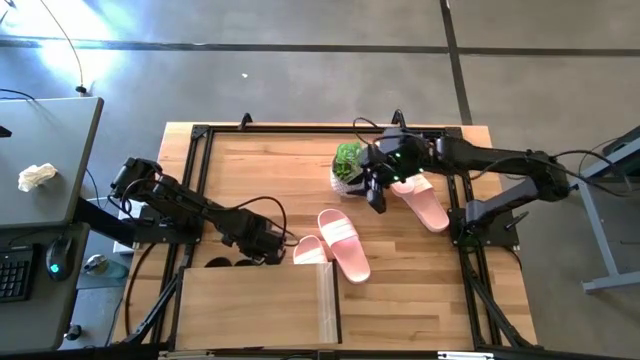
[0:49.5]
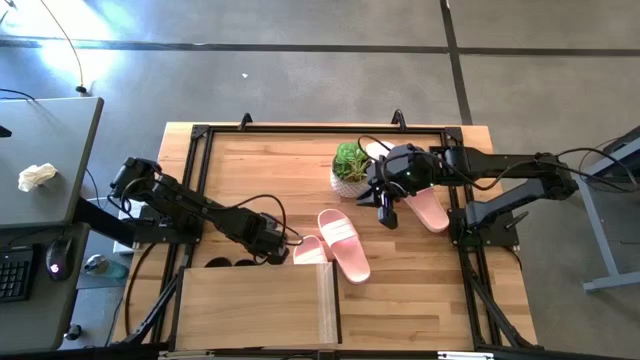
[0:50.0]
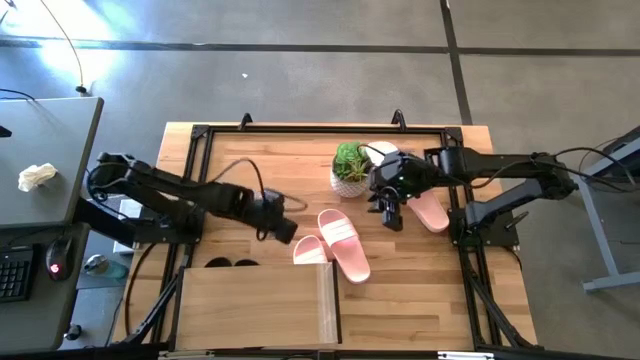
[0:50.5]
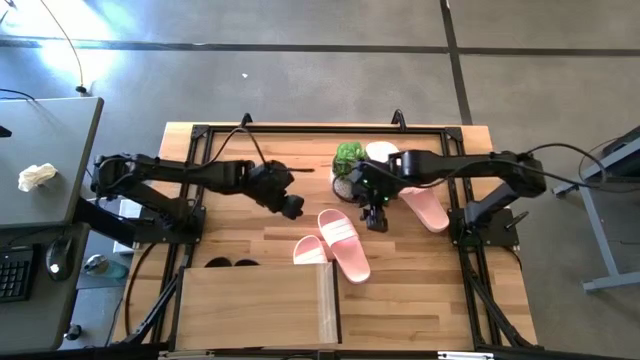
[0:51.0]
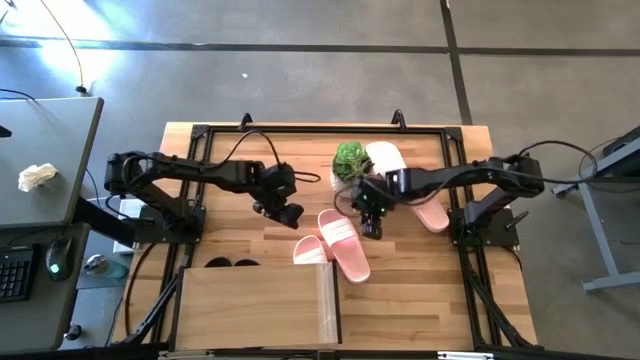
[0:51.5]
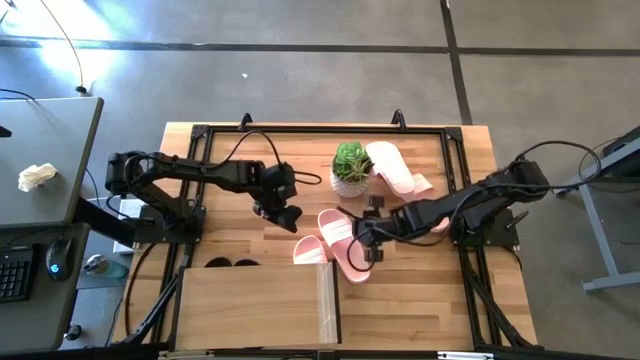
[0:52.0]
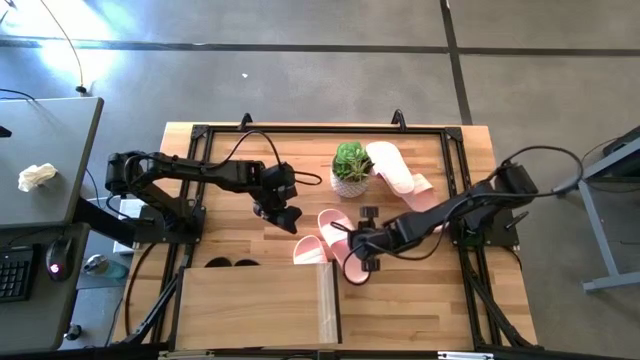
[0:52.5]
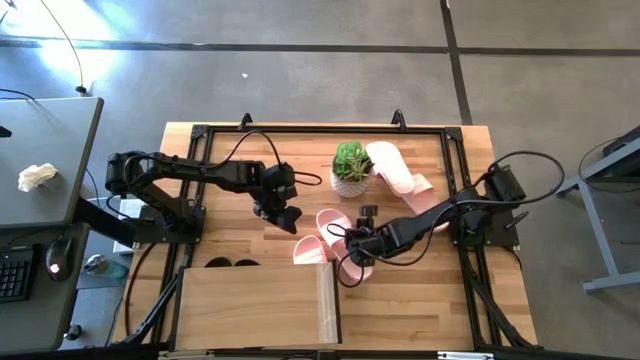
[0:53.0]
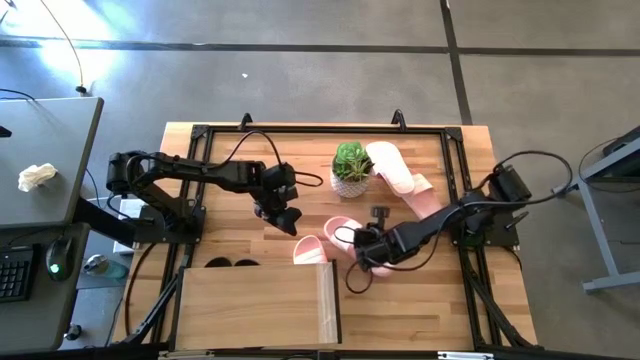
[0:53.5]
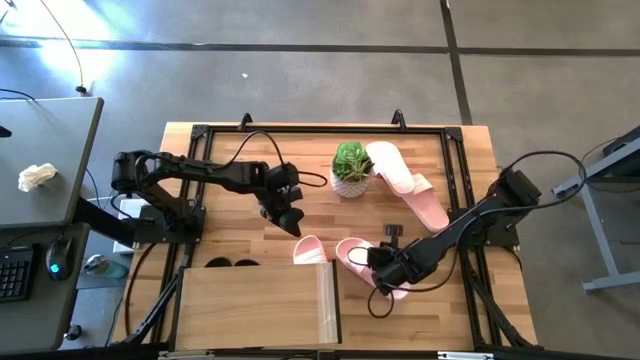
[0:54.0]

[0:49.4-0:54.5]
Task: Pick and place slides into the shelf
Adjust the pink slide on the table

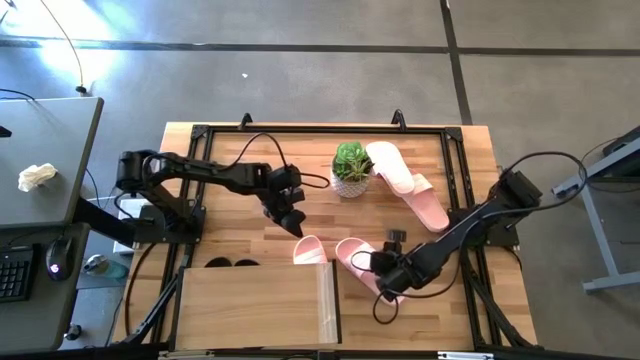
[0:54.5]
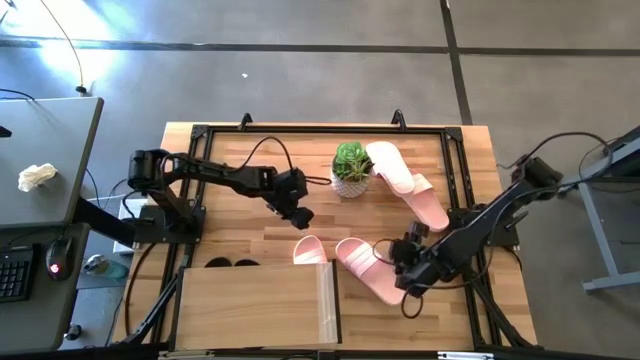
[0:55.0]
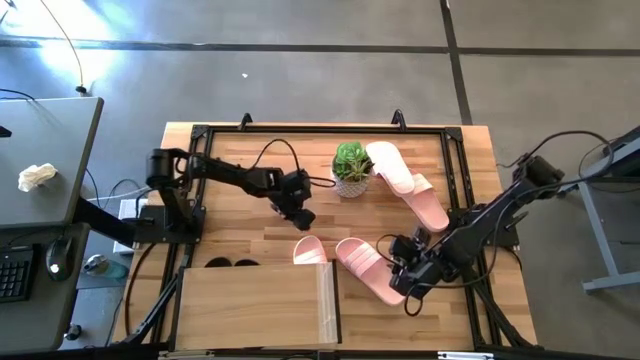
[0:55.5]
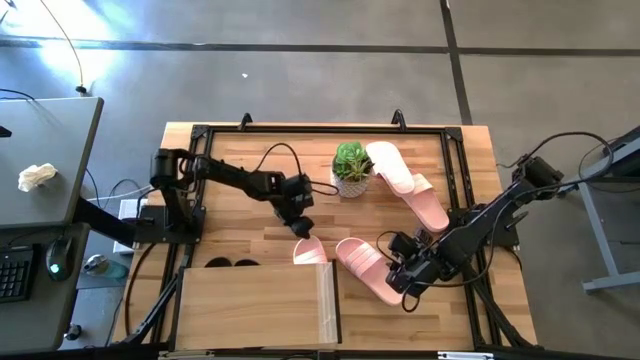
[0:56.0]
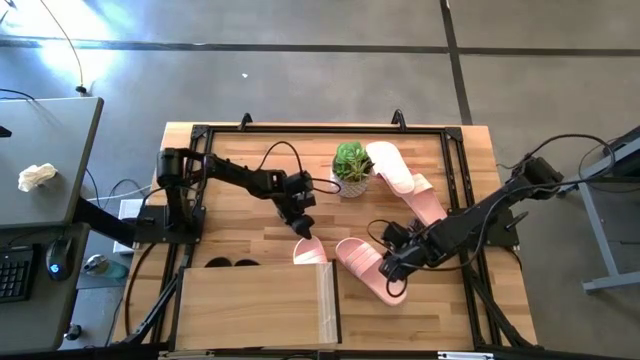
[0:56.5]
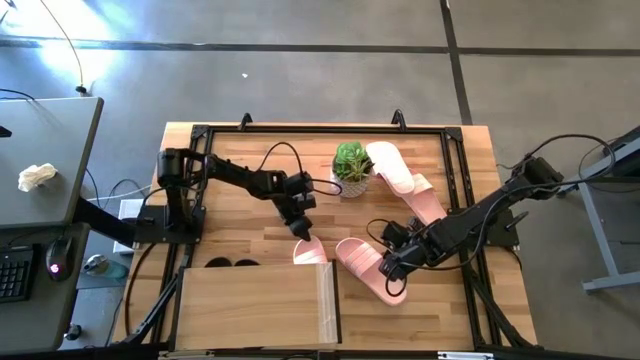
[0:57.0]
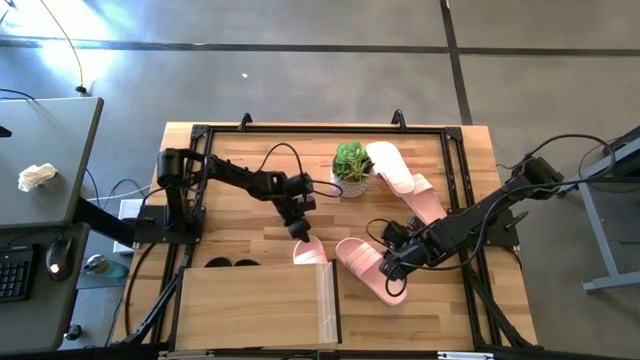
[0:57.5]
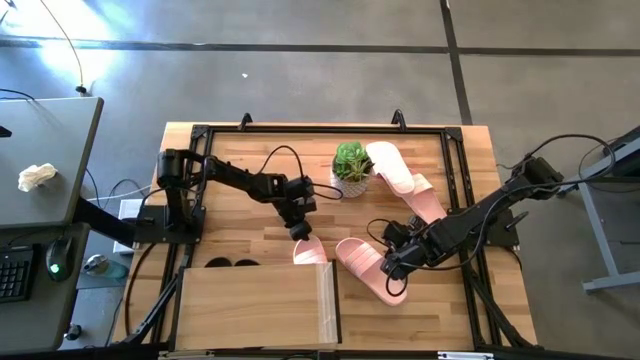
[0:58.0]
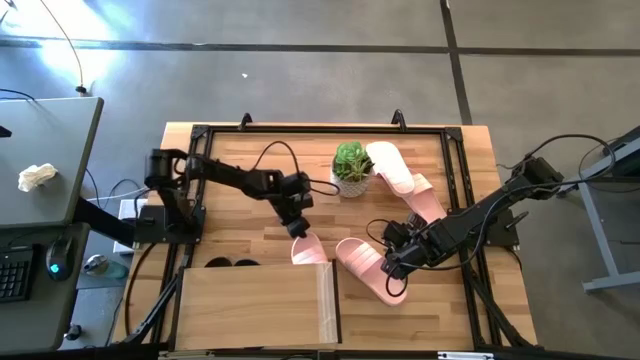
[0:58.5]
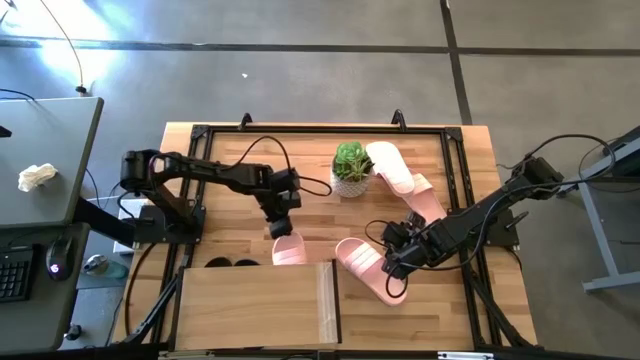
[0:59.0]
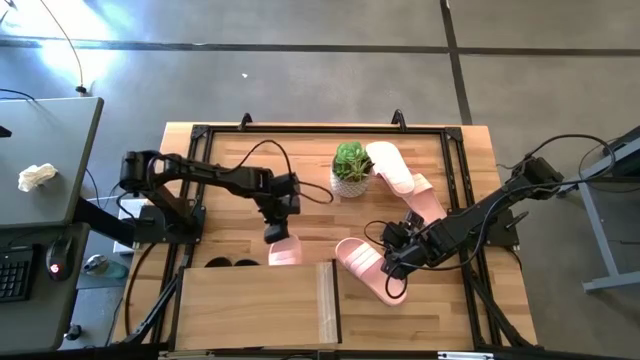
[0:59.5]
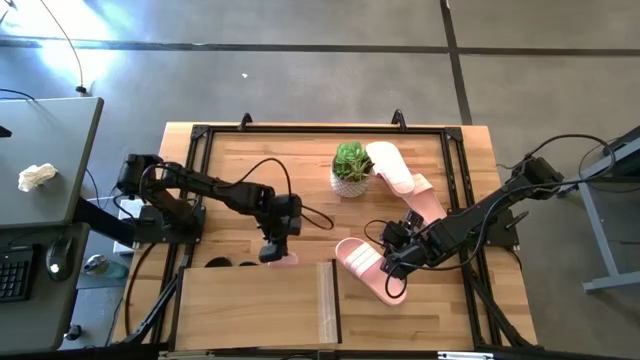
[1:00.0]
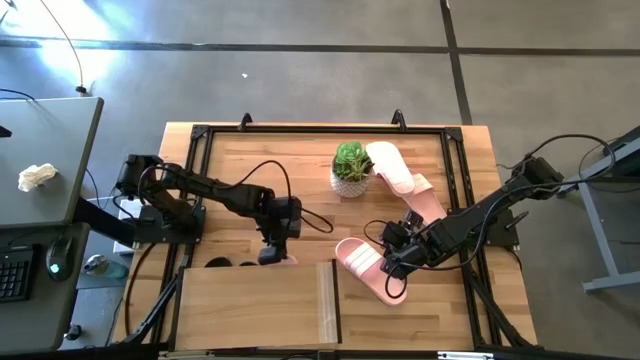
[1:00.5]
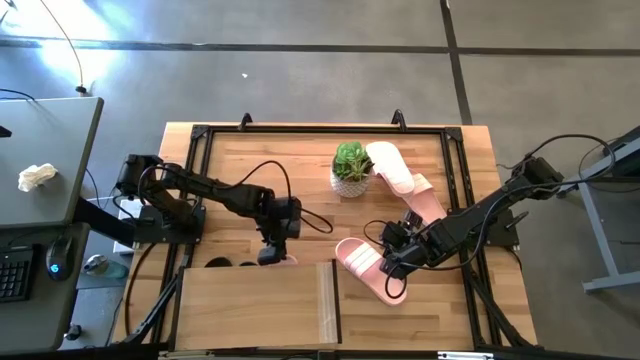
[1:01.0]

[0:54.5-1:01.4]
Put the pink slide under the shelf

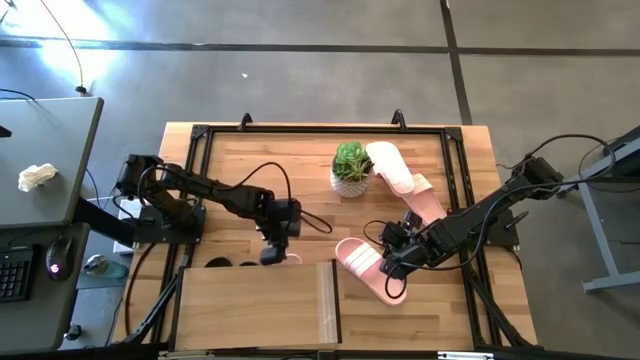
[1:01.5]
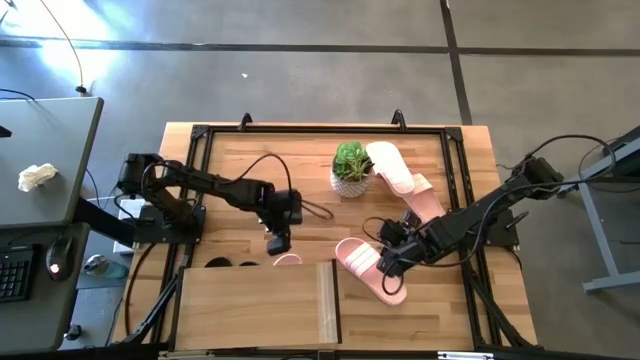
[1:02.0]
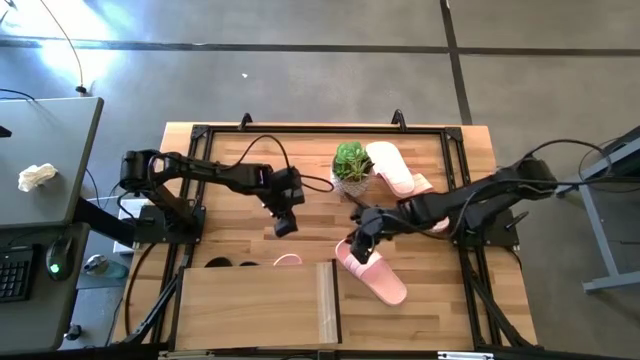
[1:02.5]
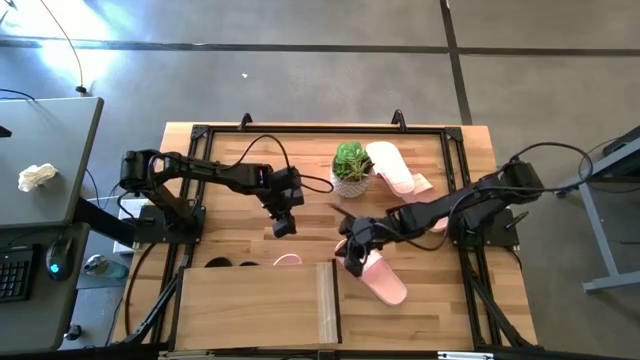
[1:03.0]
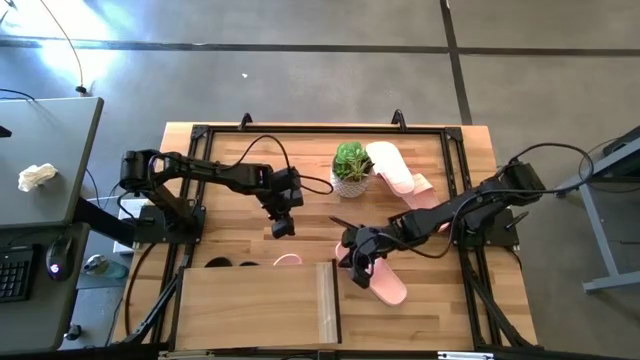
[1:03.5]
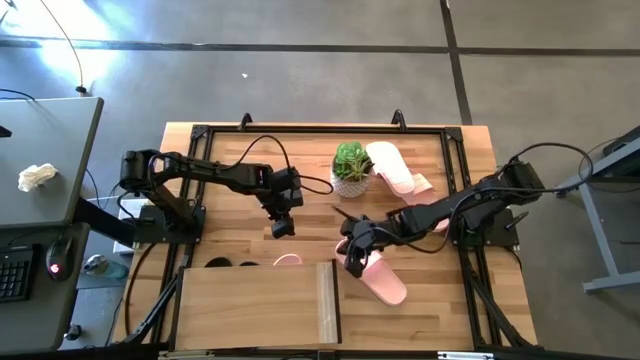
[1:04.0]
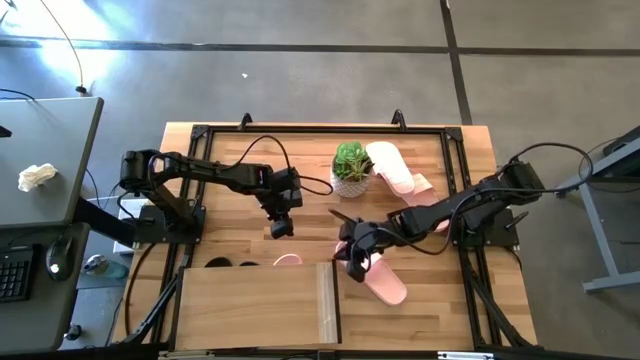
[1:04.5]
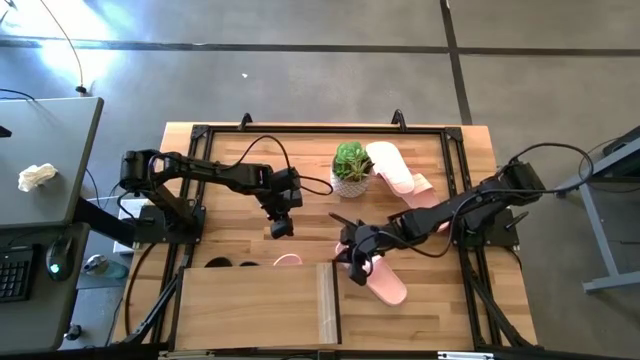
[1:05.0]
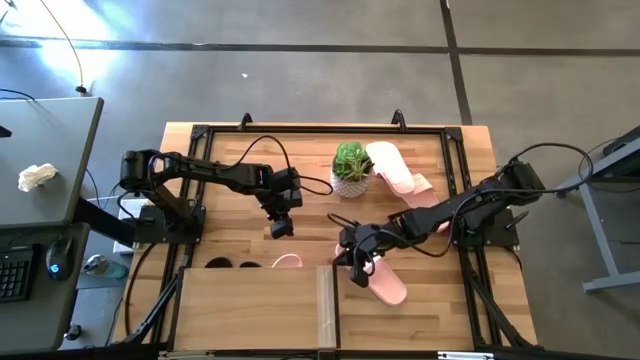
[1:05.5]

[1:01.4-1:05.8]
Adjust the shelf on the table

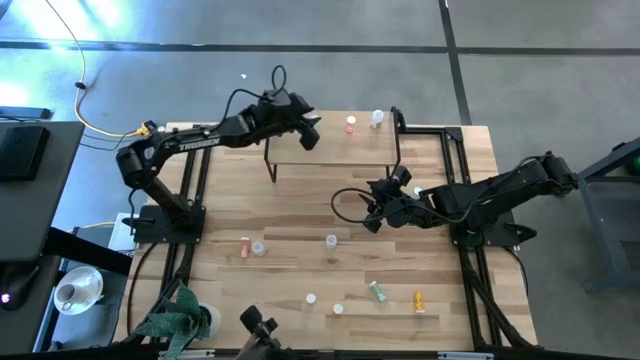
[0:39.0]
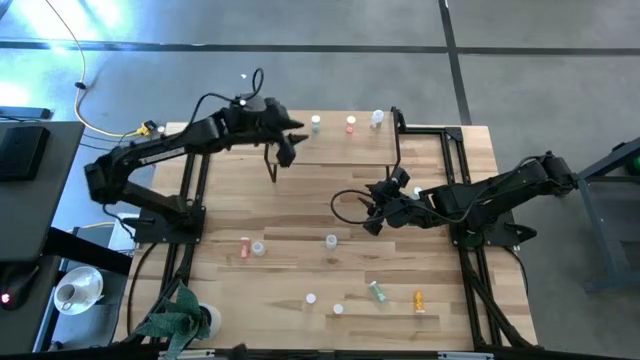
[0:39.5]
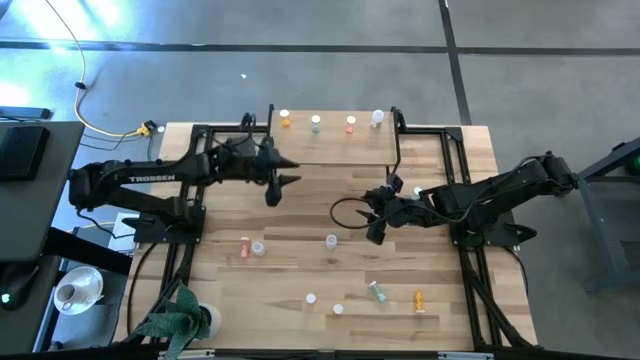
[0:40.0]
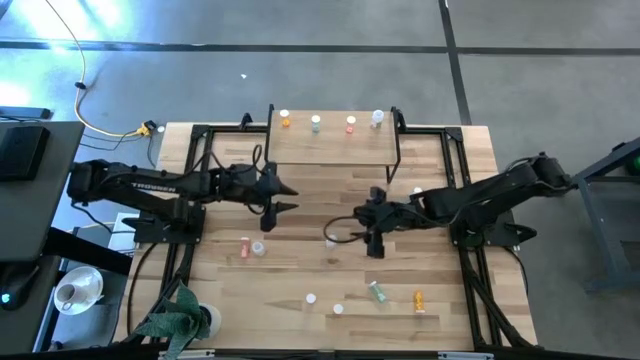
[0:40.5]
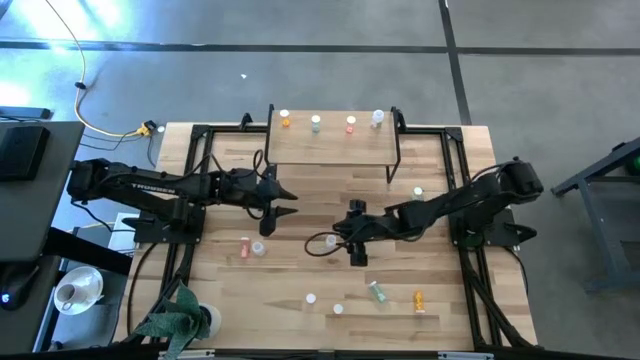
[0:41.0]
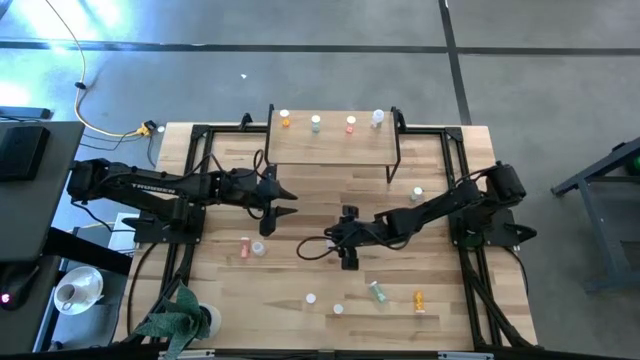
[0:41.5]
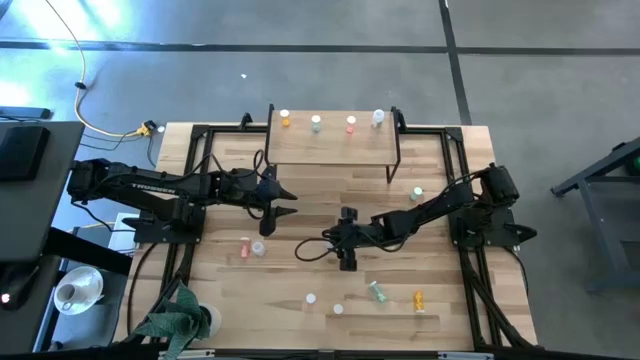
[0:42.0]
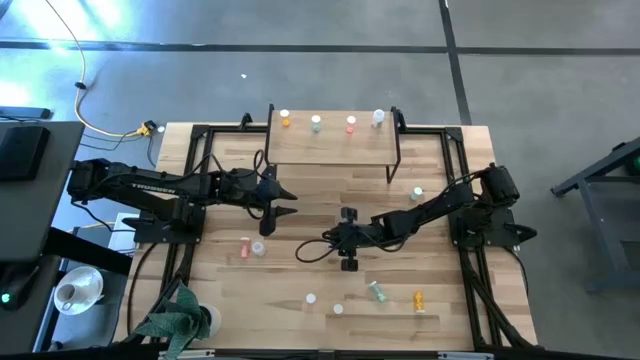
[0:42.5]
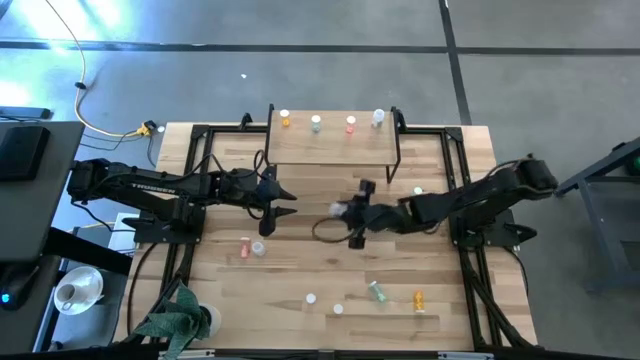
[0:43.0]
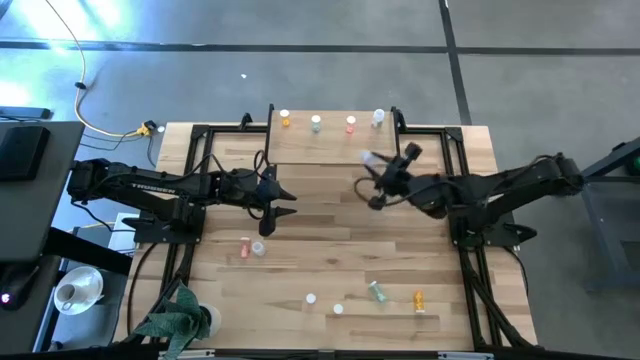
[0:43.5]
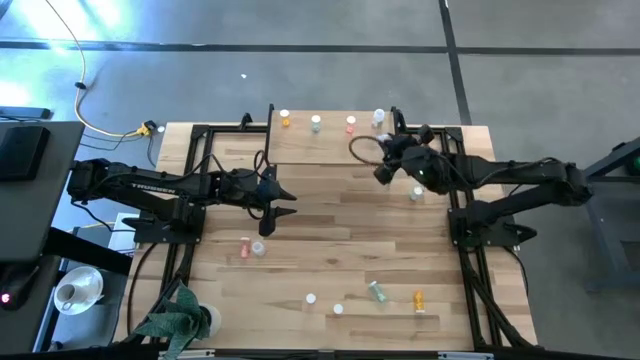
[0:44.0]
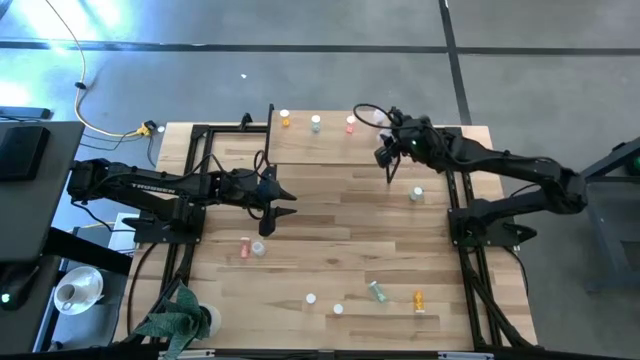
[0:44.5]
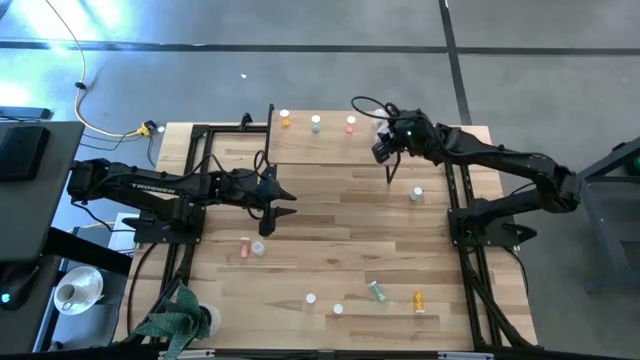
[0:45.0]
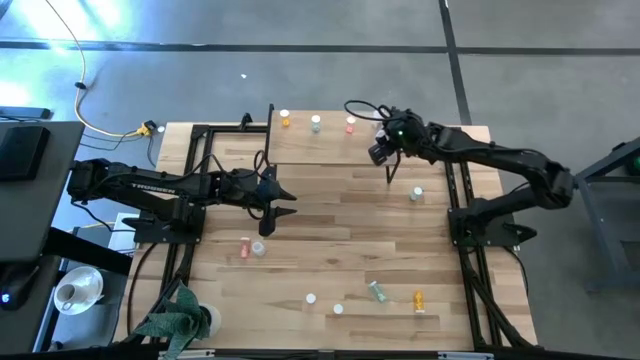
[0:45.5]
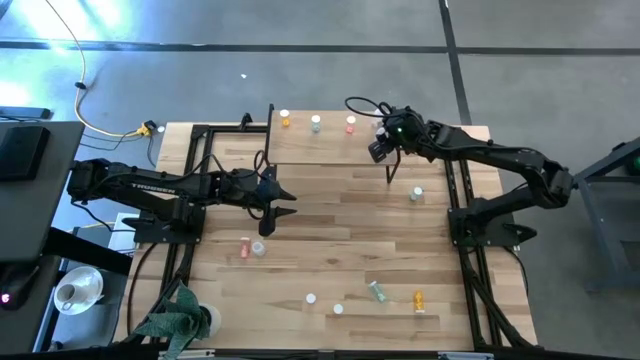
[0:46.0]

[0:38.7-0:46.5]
Task: Pick and place medicine bottles onto shelf by color
Put the right white pill bottle on the shelf
